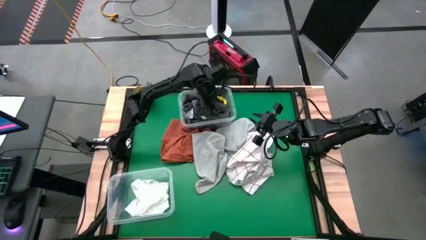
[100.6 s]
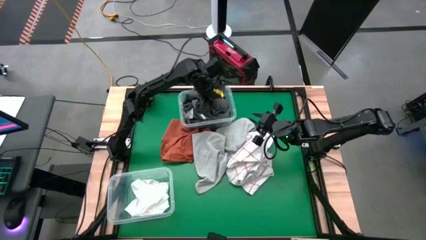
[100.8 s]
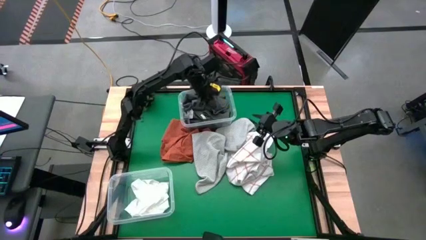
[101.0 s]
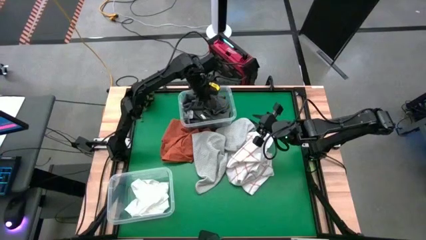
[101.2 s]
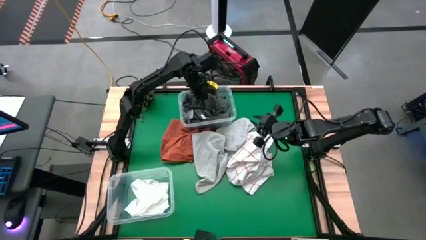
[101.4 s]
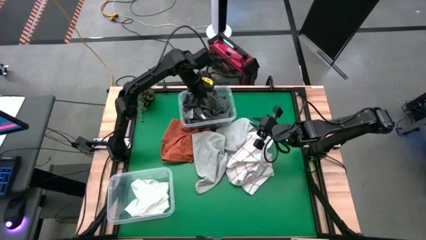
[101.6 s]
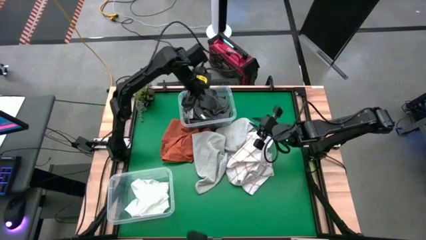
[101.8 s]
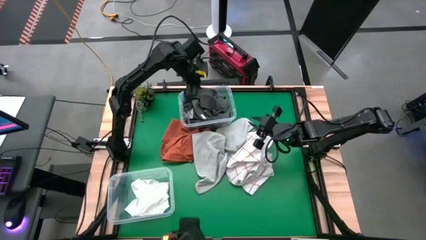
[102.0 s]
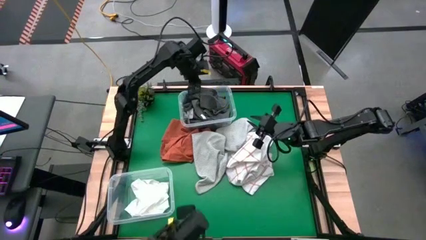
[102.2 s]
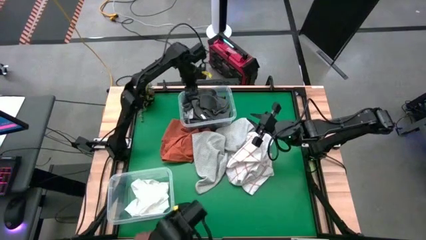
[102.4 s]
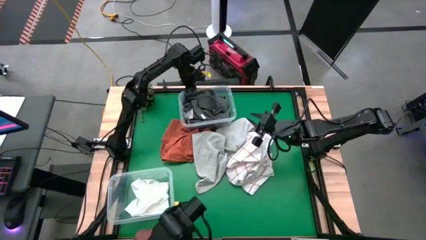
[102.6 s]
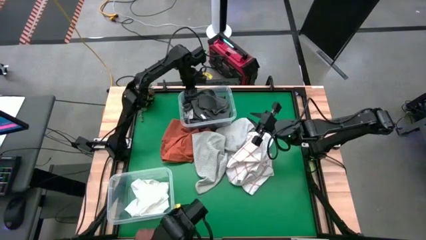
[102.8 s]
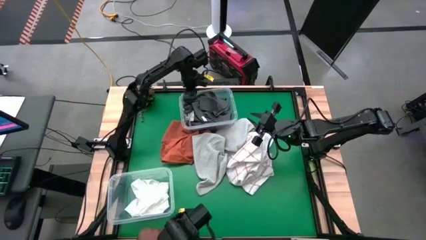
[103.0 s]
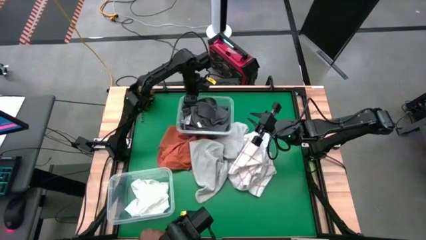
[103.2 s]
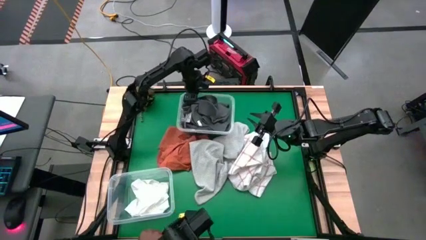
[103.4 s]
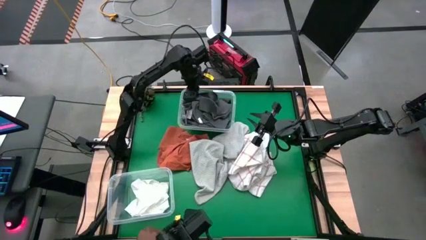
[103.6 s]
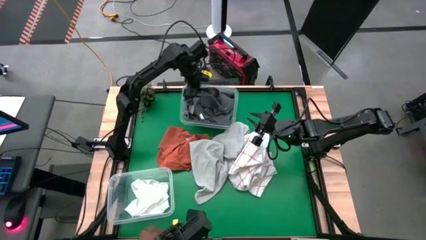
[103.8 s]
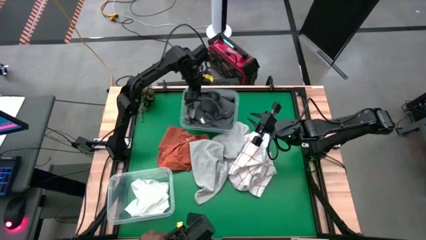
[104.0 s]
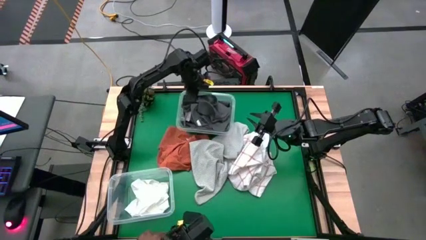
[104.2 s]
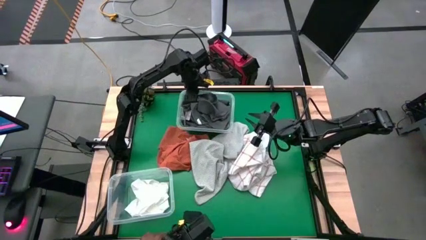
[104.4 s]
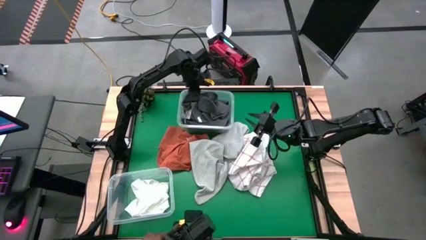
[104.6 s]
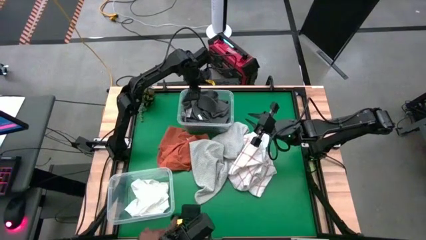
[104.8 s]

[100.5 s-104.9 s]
Task: Sort towels by color in basket
Adjust the top transparent bin

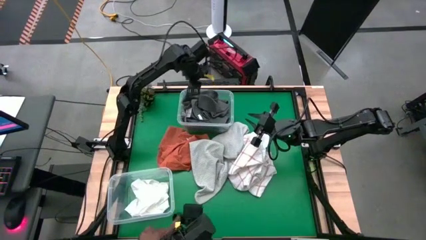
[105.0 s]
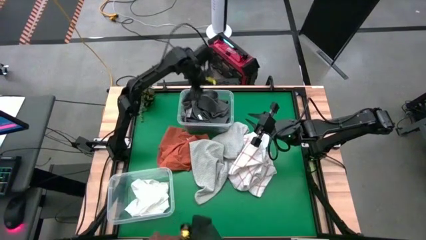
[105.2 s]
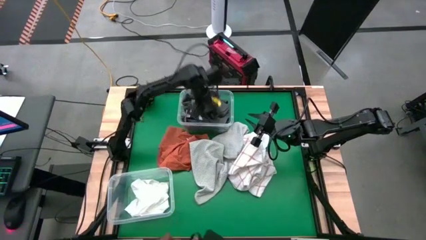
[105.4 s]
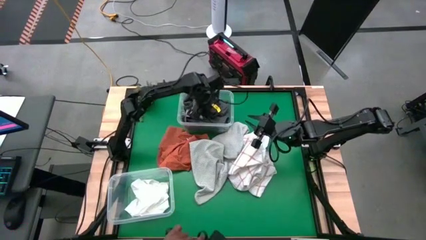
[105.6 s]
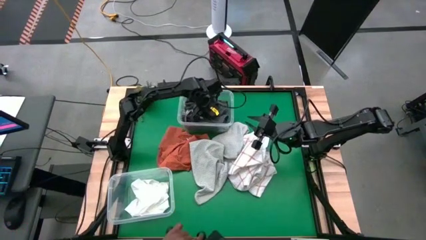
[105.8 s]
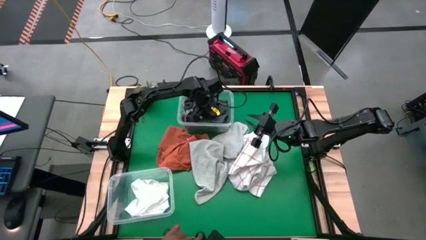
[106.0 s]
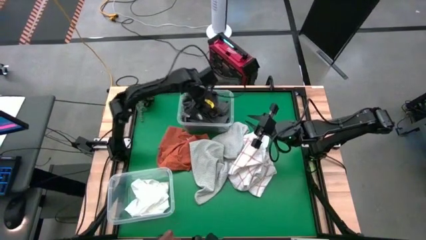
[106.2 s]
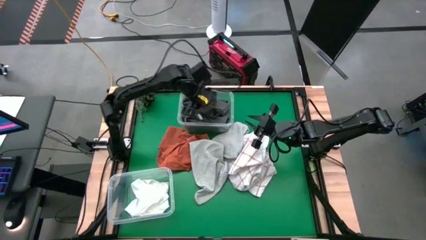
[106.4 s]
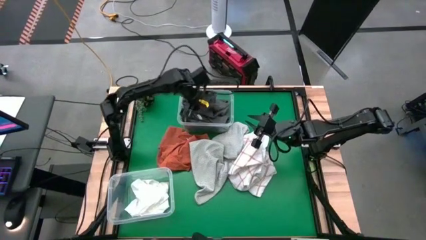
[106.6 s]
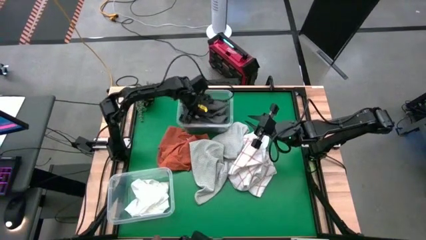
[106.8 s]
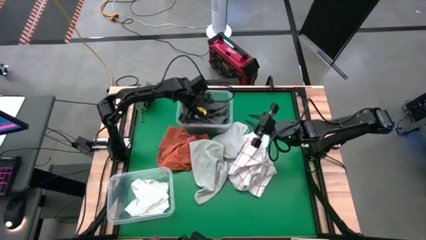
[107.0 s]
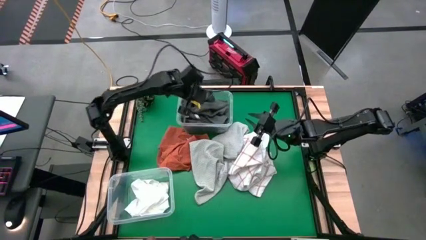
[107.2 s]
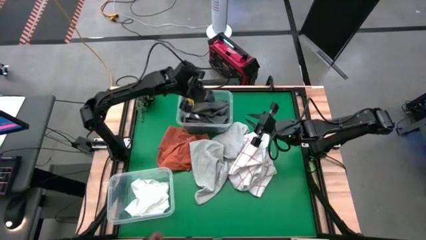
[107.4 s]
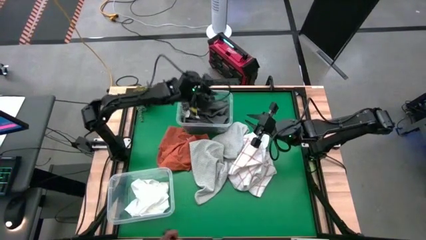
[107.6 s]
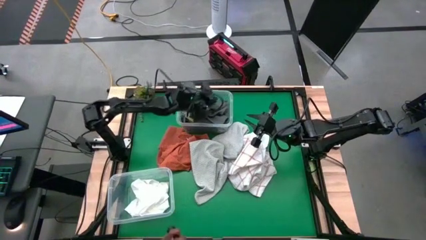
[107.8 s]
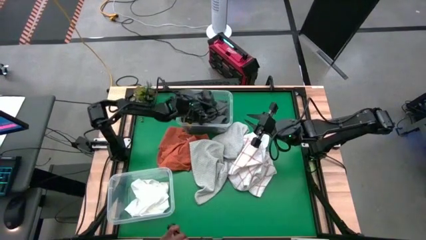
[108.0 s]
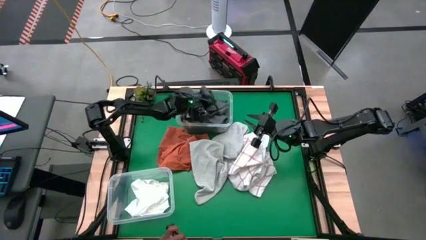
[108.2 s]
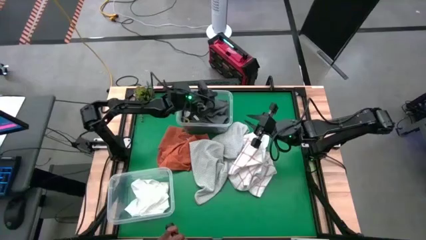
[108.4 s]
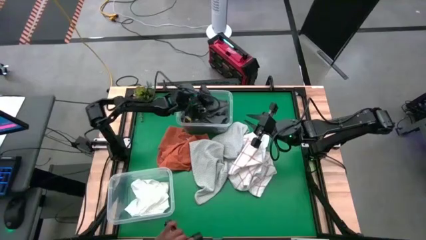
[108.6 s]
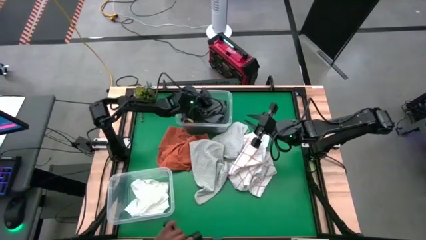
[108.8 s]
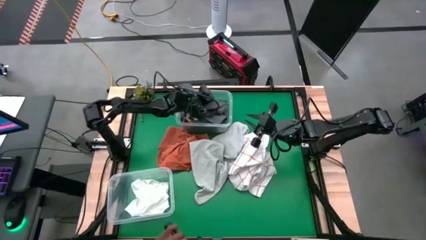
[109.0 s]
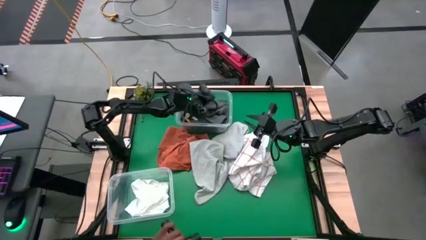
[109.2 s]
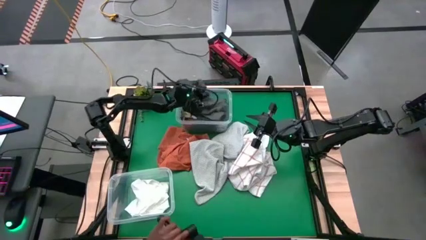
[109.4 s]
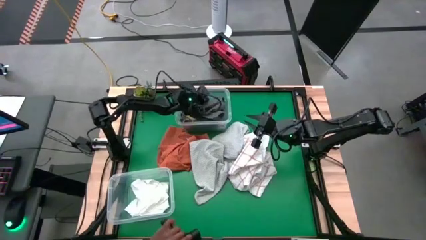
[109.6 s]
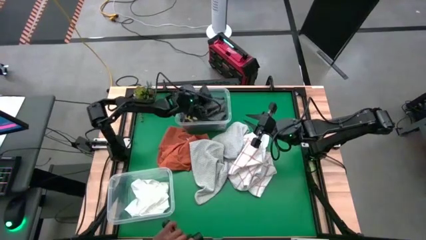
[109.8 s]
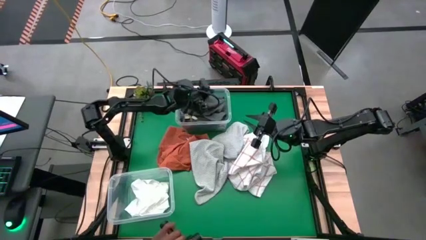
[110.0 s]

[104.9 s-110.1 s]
Adjust the gray towel into the top transparent bin

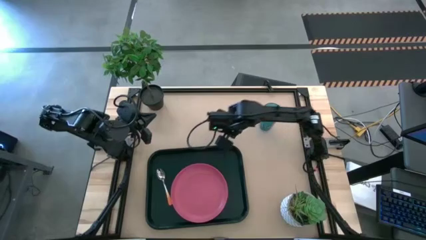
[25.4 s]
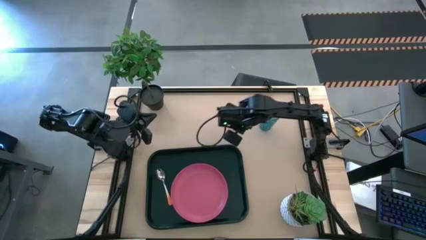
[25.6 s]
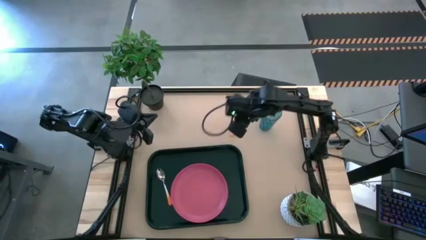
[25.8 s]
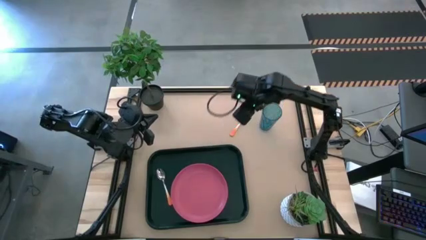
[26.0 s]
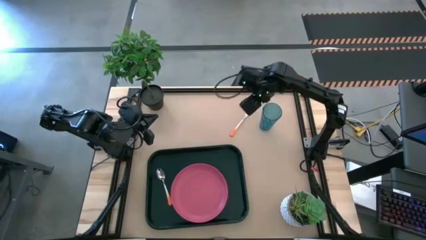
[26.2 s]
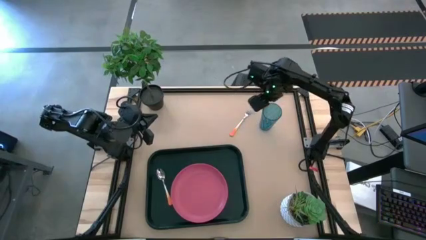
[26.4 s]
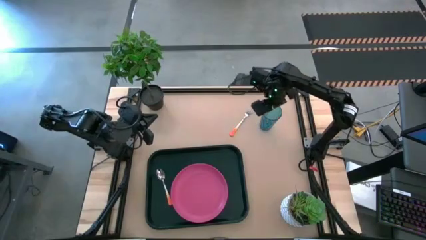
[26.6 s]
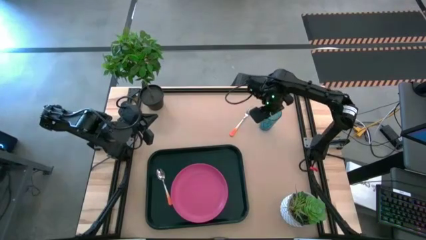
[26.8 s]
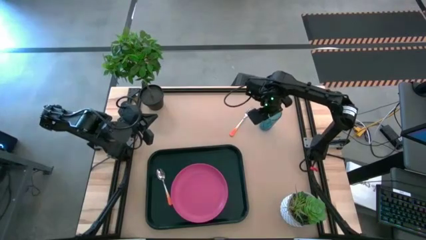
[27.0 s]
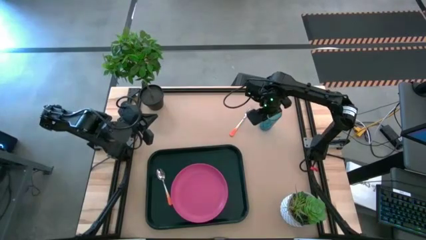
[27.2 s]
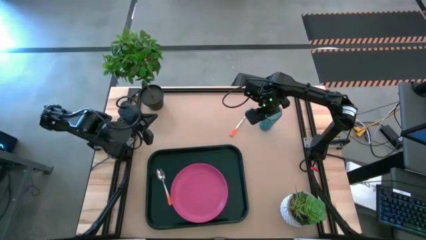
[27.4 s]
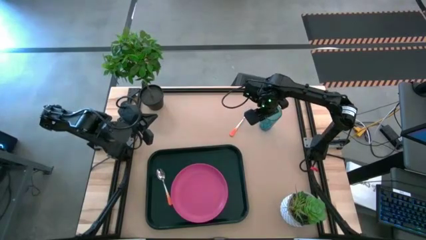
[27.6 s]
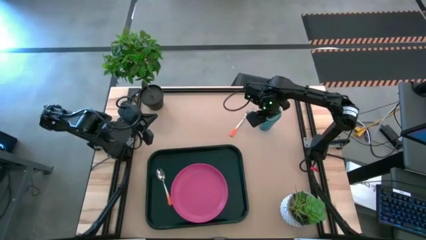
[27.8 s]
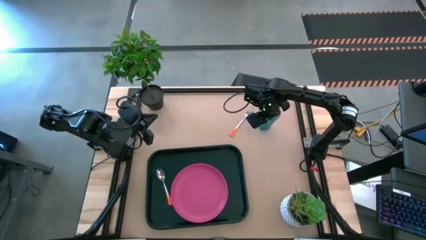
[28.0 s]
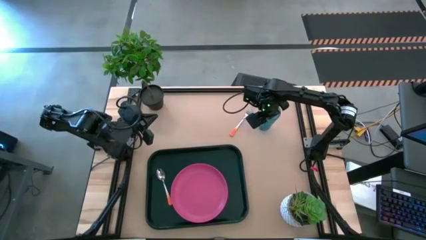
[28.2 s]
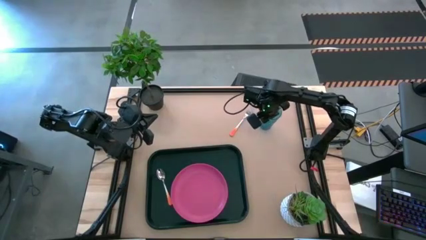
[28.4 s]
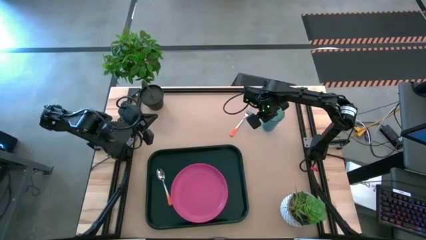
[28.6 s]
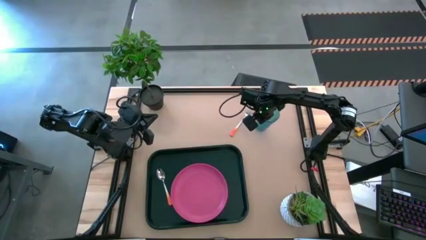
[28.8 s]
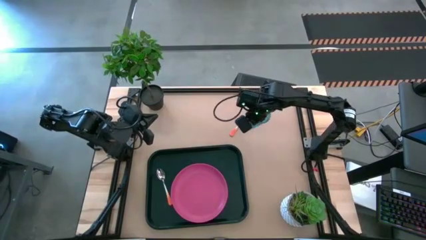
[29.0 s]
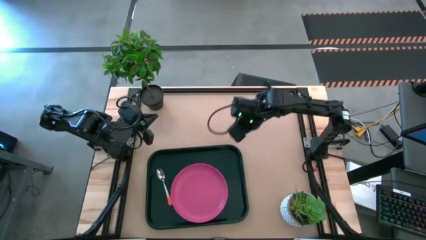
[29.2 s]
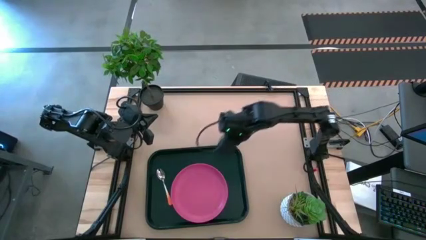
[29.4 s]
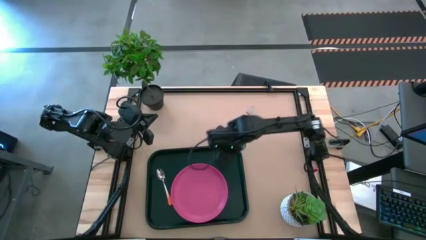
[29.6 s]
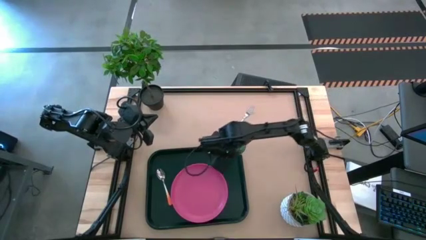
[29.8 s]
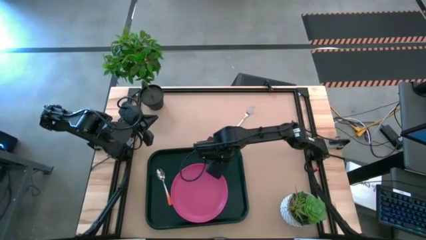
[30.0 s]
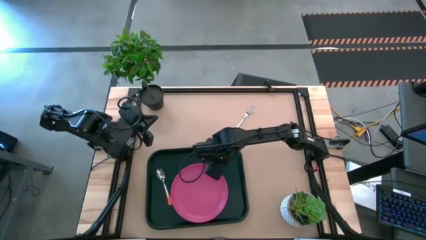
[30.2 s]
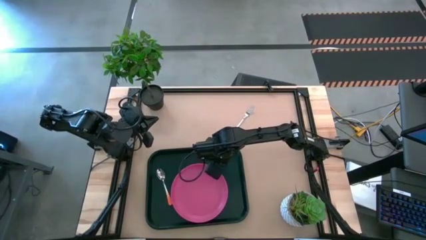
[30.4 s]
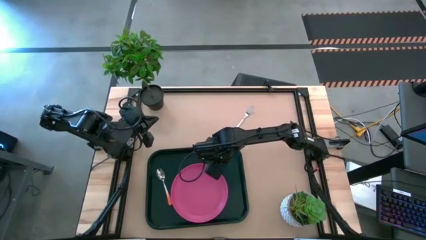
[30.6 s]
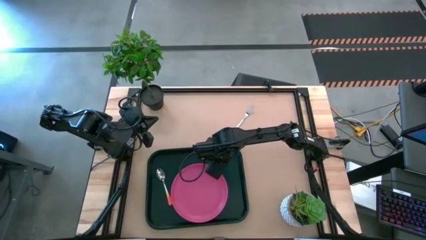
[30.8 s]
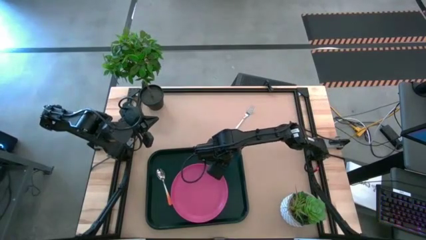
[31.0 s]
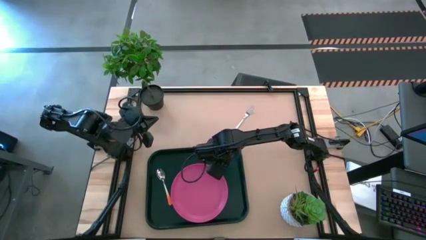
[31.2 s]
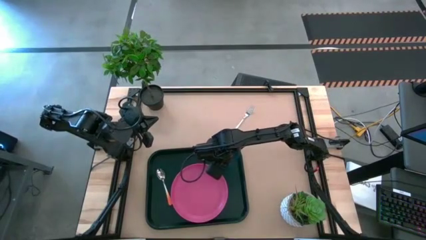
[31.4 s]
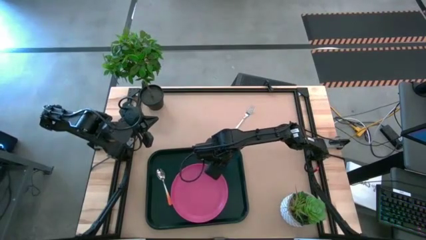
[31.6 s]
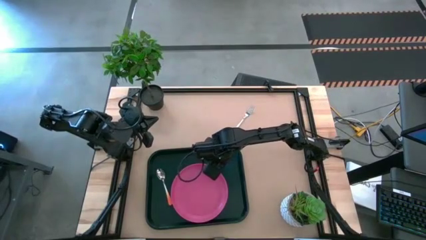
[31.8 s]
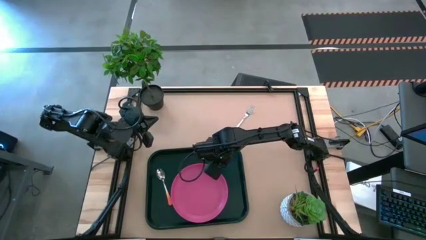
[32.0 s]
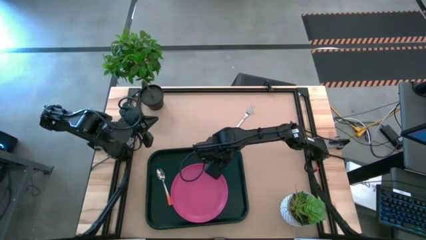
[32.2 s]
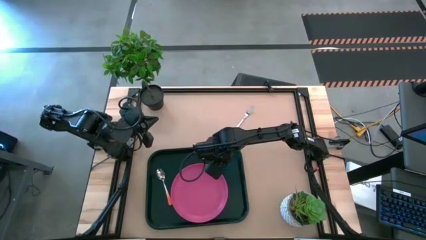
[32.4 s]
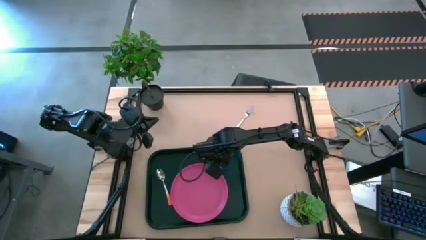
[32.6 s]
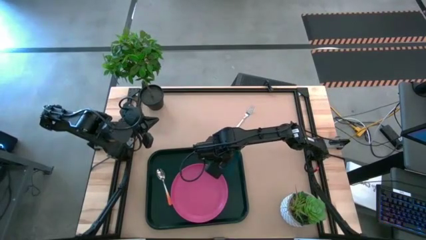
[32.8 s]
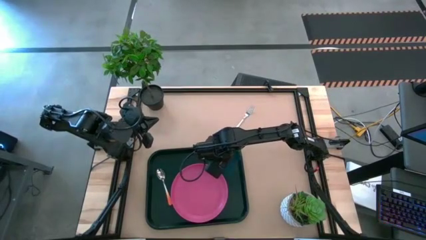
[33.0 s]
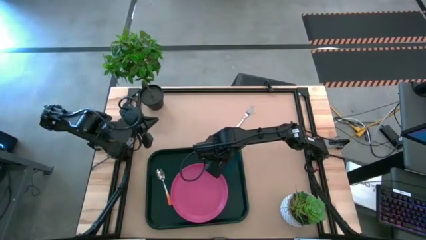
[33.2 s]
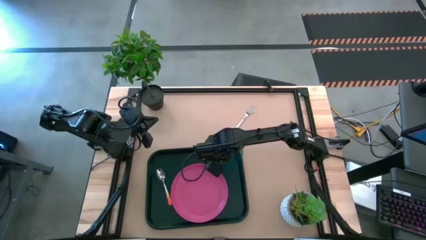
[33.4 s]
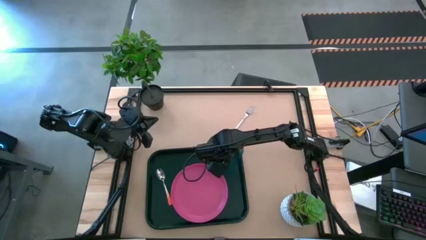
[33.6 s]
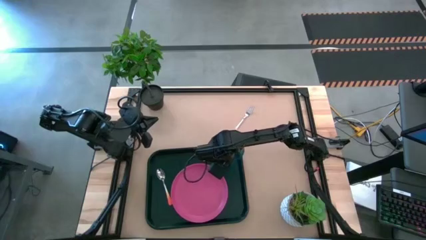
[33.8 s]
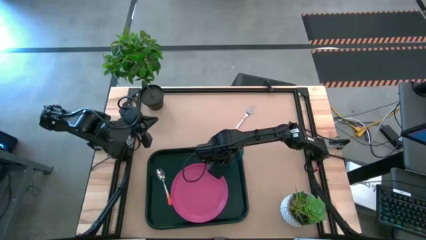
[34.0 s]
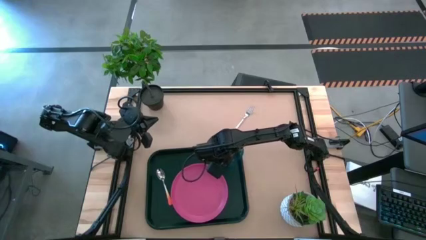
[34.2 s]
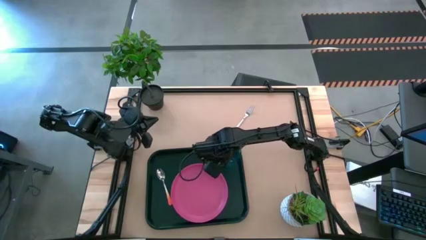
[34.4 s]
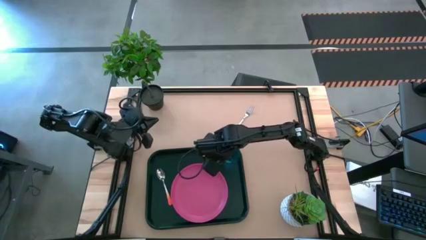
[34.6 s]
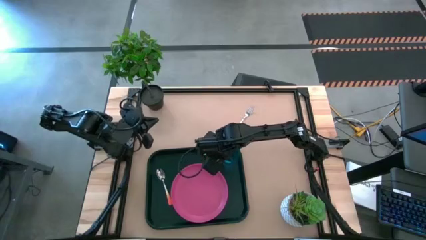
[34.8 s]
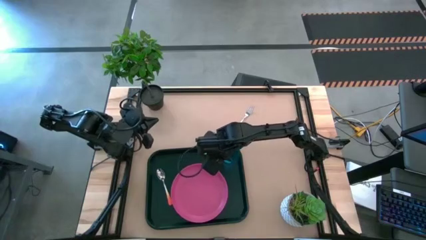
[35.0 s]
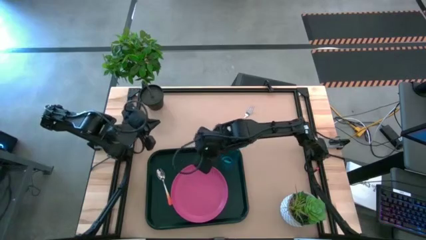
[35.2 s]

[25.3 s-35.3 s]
Task: Pick and place plate/cup/fork/spoon on tray
Put the blue cup into the black tray
